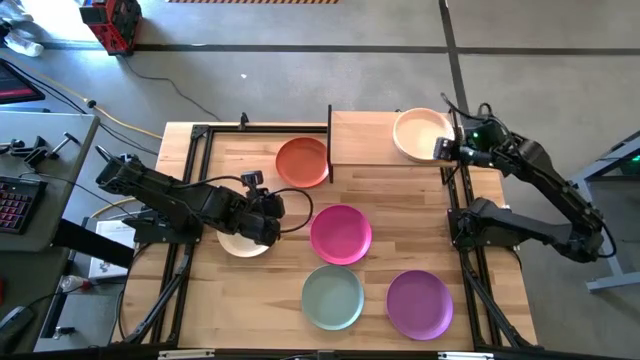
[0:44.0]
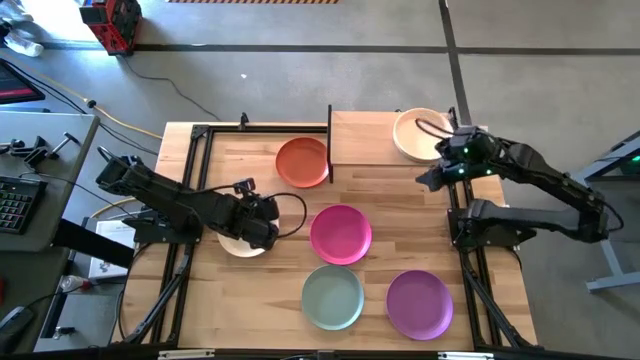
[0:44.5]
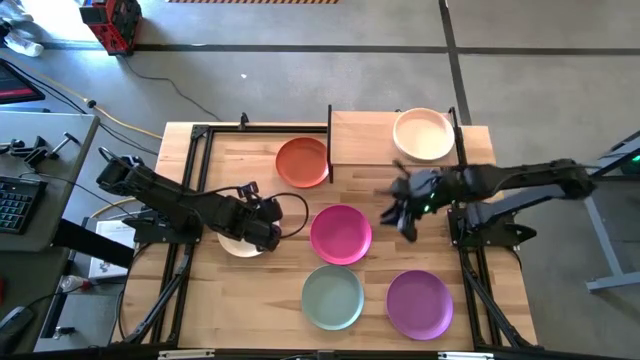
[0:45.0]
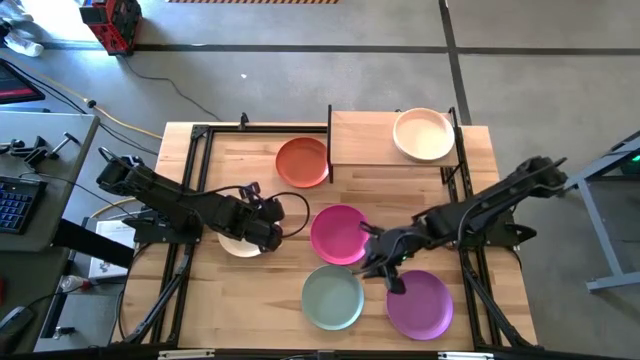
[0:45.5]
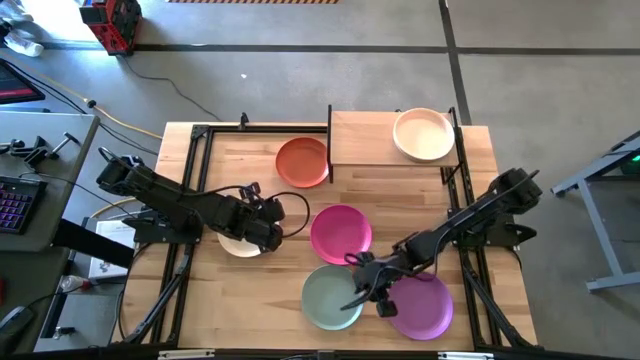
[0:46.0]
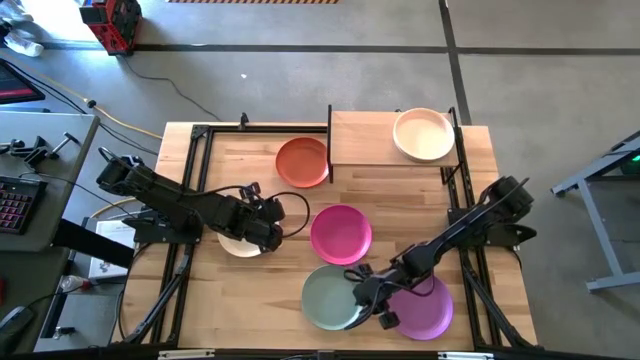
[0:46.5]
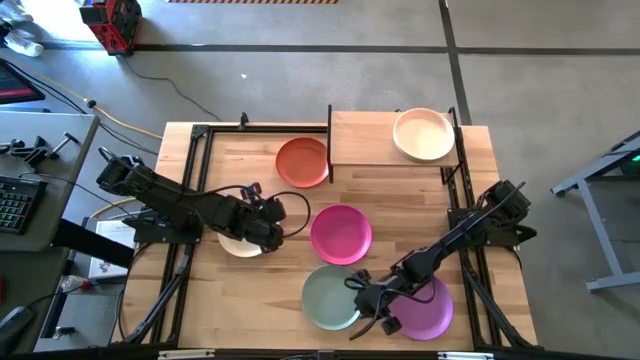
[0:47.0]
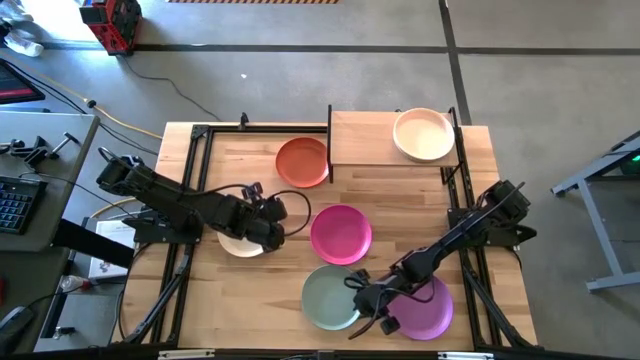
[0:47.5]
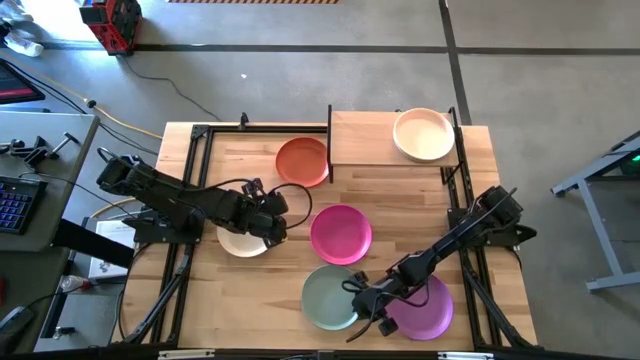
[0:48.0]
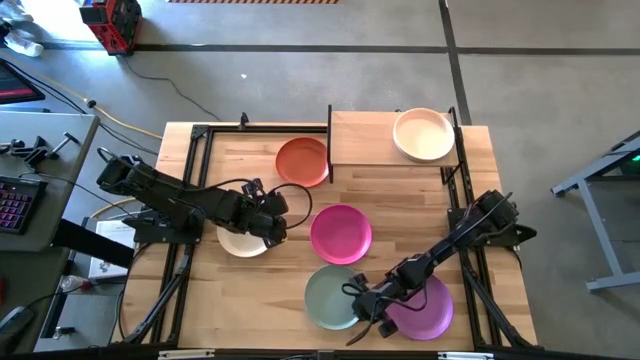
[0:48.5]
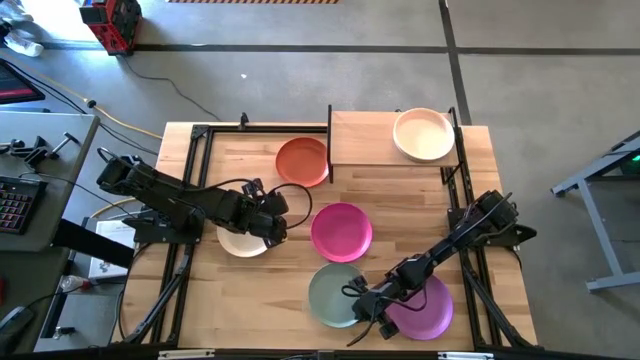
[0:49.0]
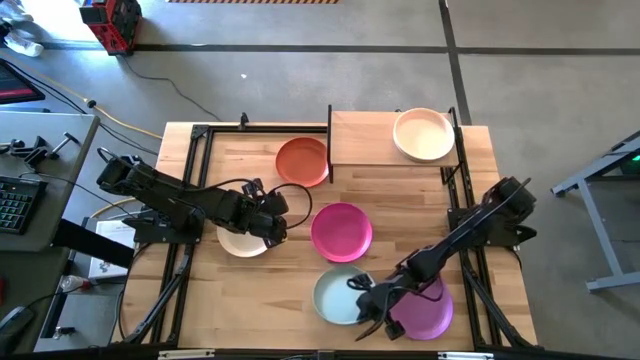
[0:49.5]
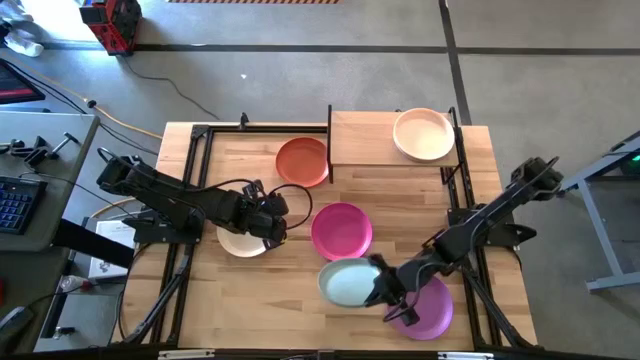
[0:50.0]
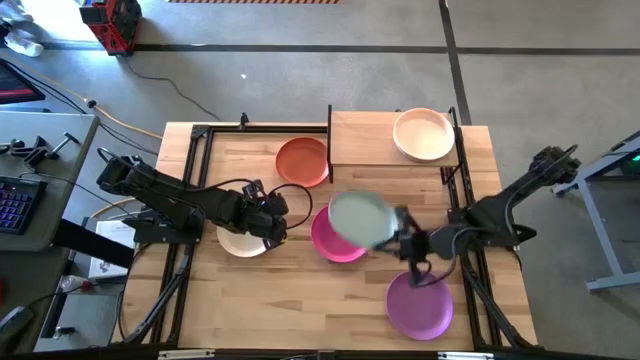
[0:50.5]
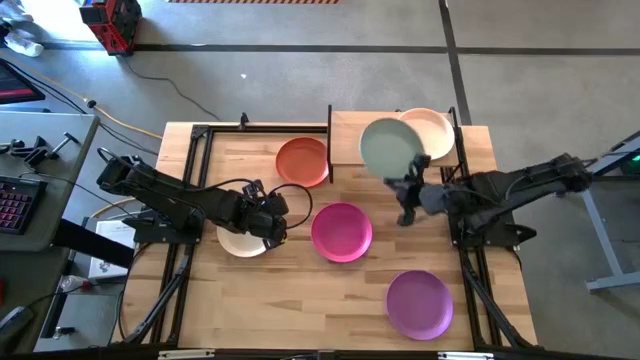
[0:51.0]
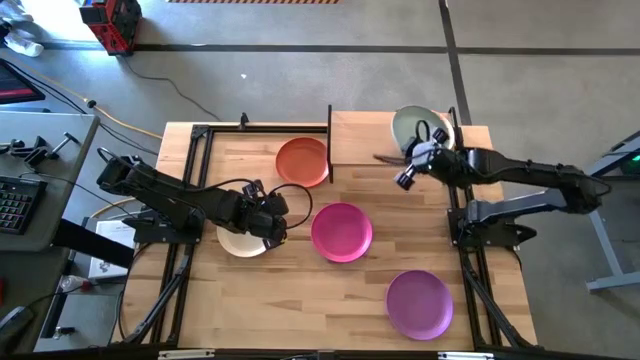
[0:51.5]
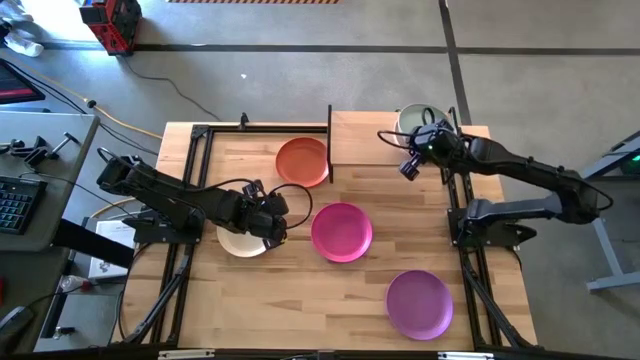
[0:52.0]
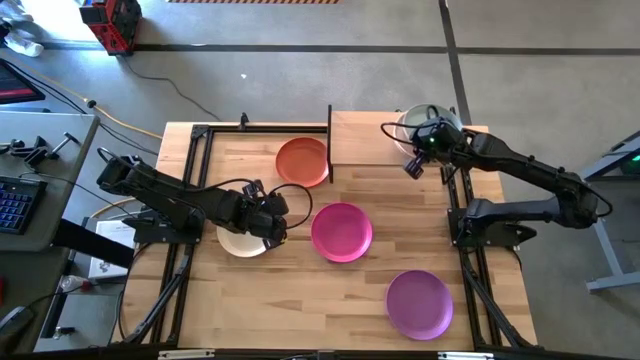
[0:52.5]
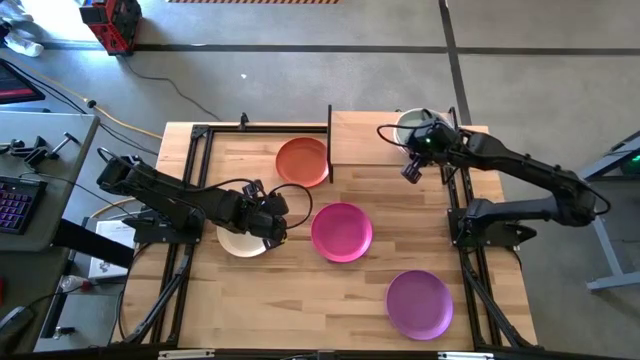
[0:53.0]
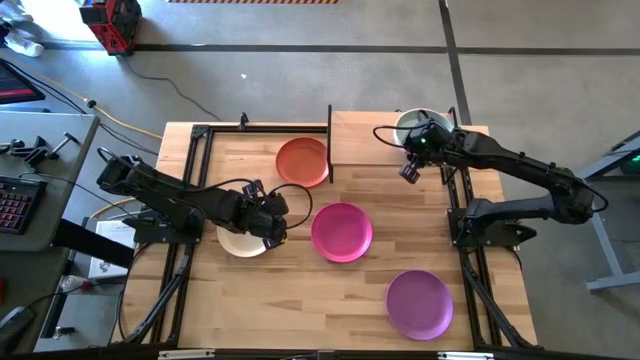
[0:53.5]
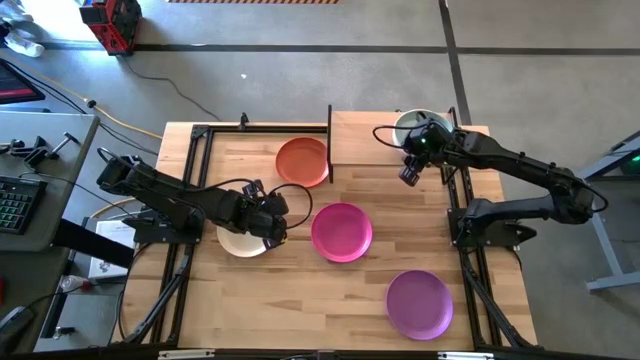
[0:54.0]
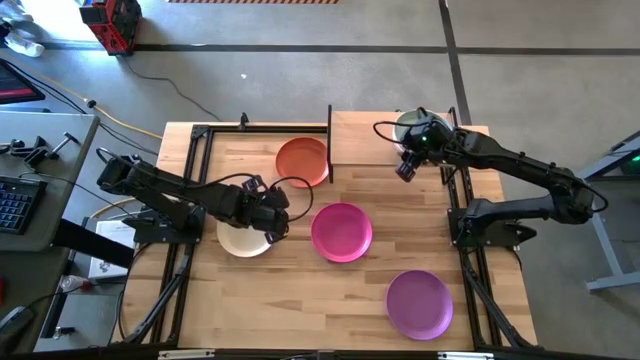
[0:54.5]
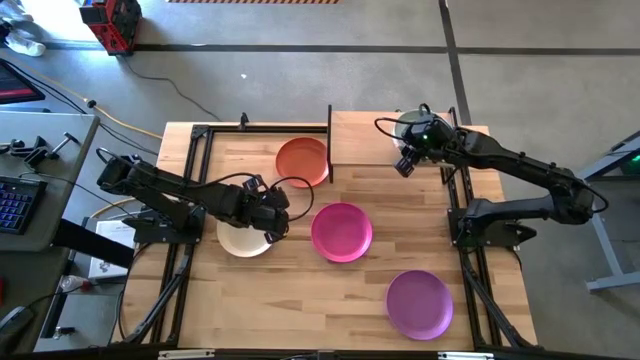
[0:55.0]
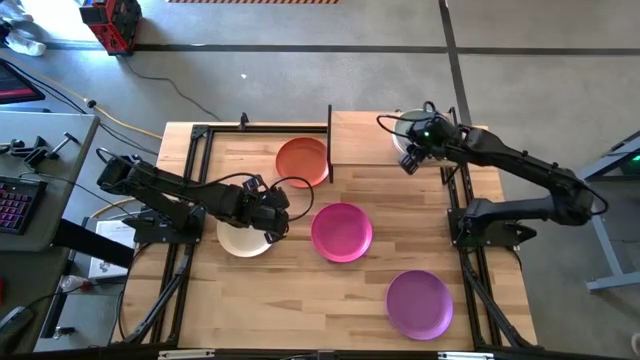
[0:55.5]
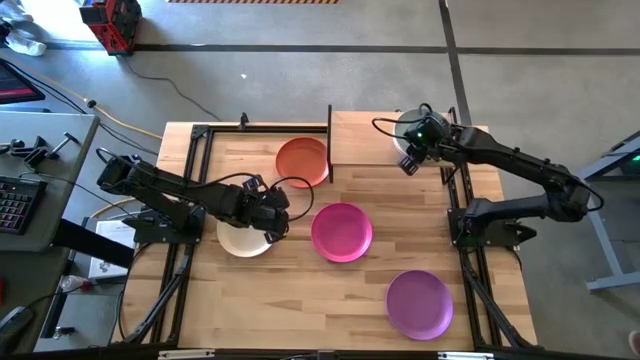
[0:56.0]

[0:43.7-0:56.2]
Task: Place and stack plates onto a shelf
Stack the light blue plate on top of the peach plate on the shelf

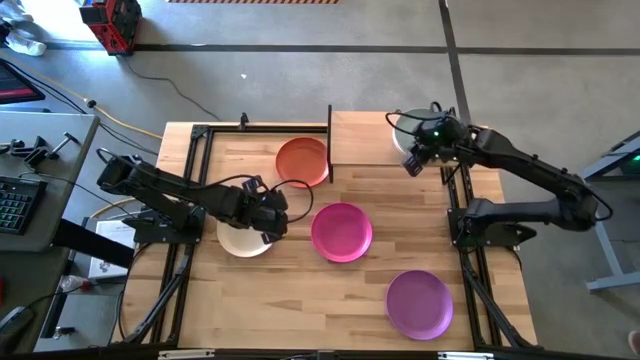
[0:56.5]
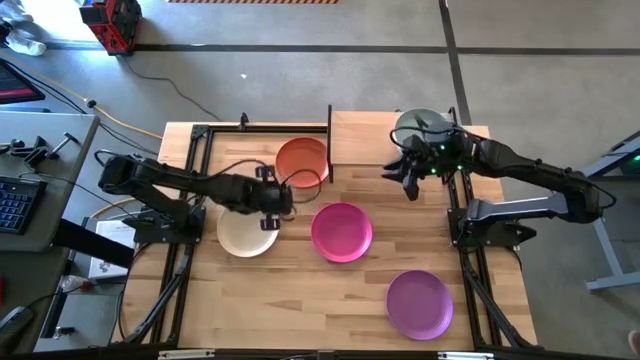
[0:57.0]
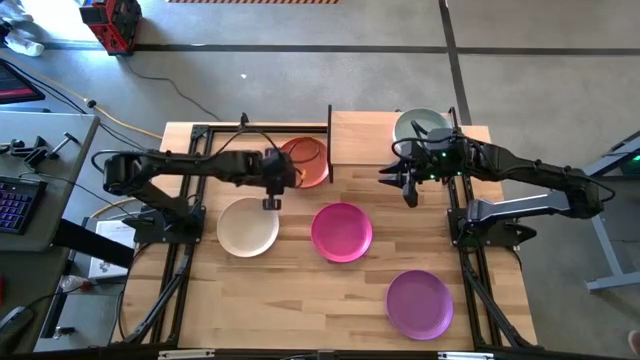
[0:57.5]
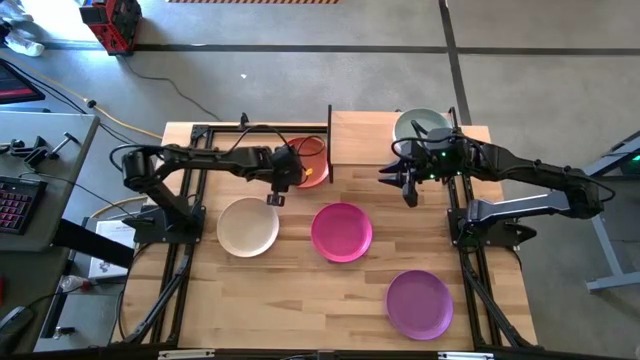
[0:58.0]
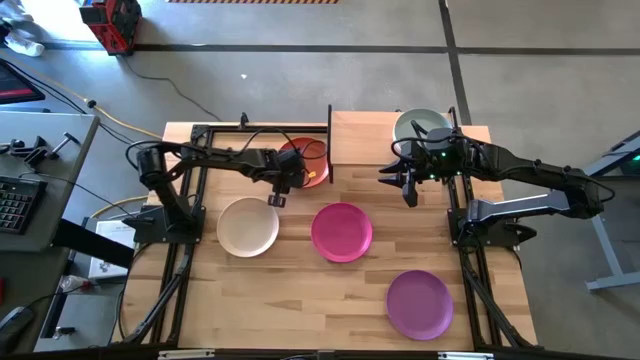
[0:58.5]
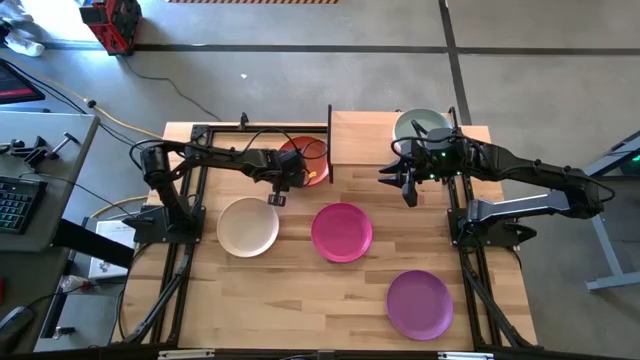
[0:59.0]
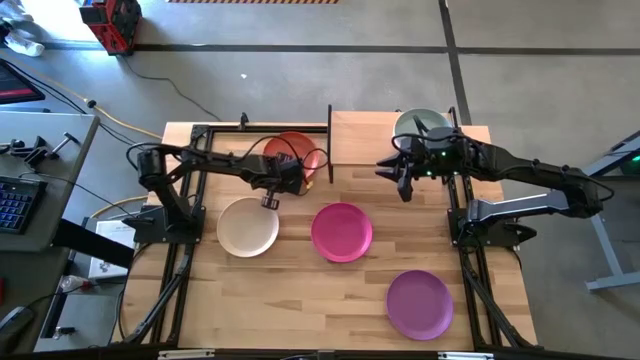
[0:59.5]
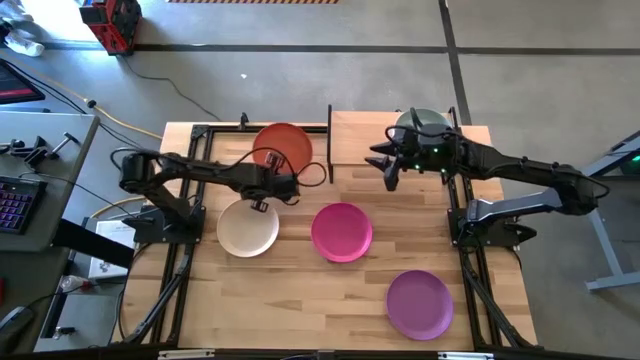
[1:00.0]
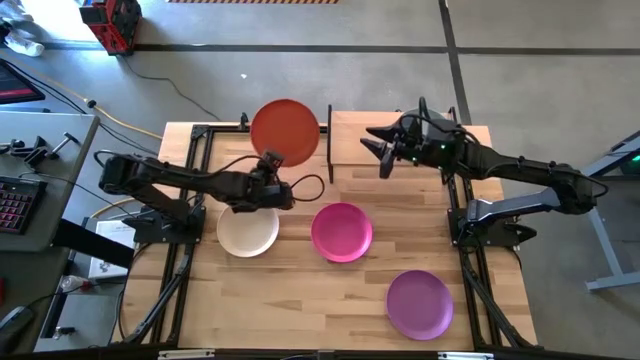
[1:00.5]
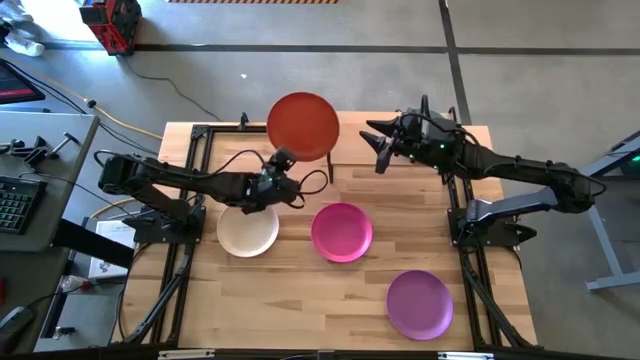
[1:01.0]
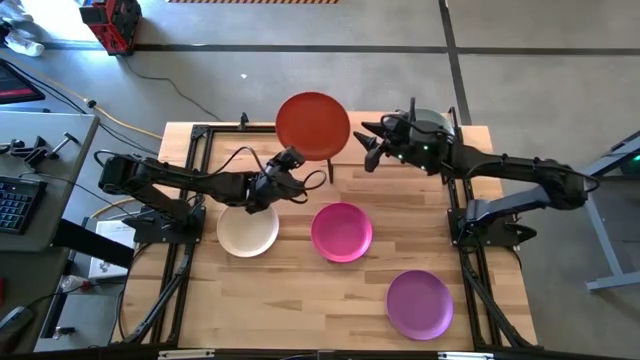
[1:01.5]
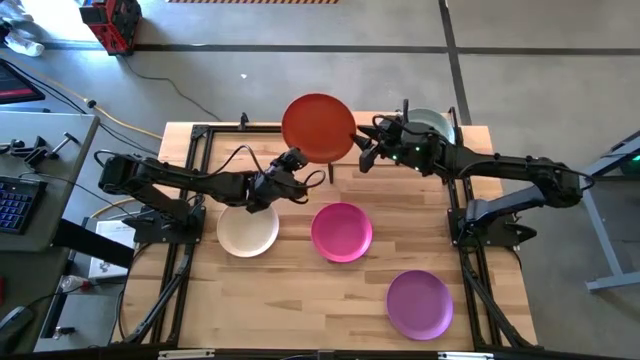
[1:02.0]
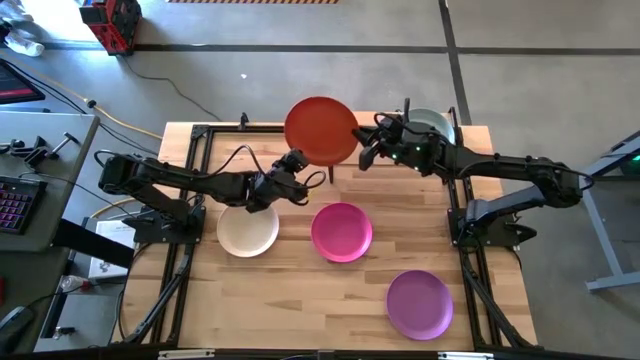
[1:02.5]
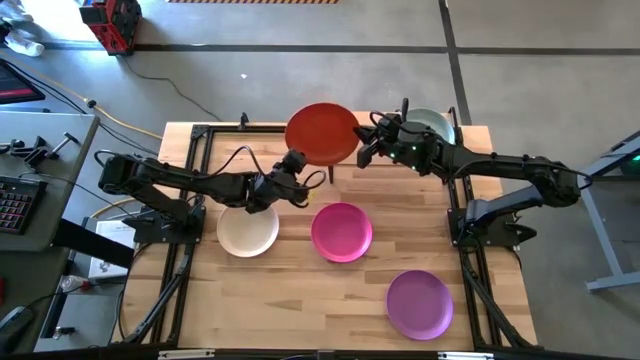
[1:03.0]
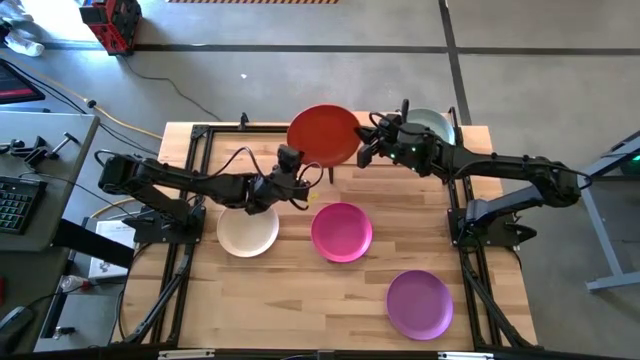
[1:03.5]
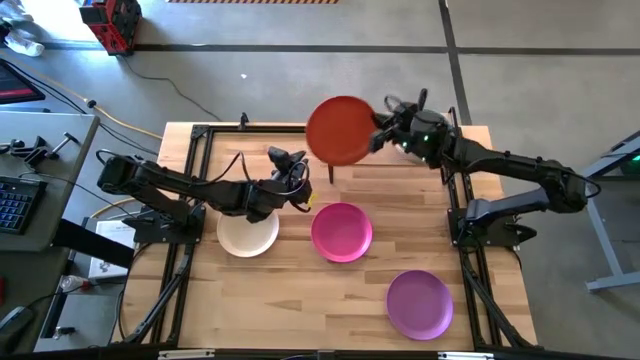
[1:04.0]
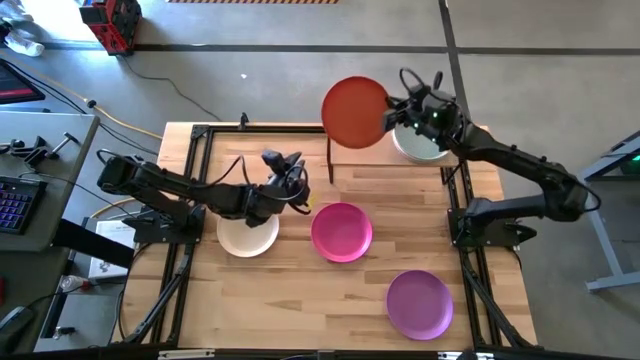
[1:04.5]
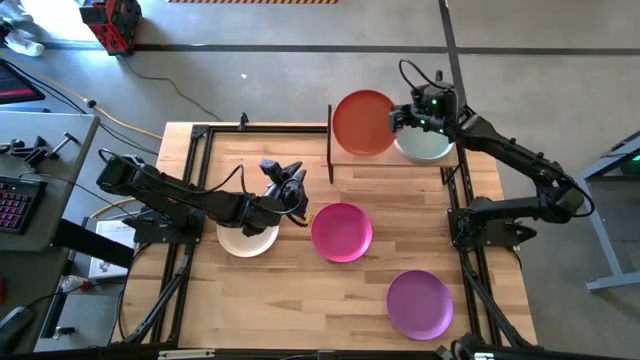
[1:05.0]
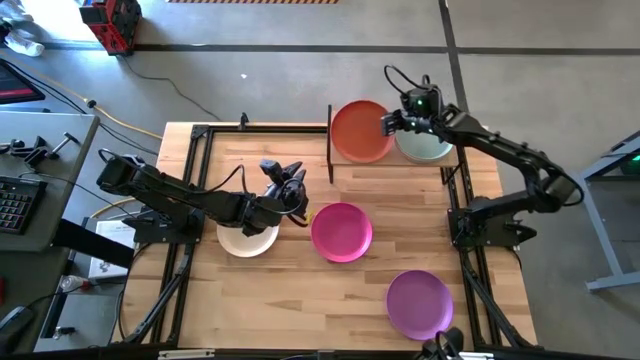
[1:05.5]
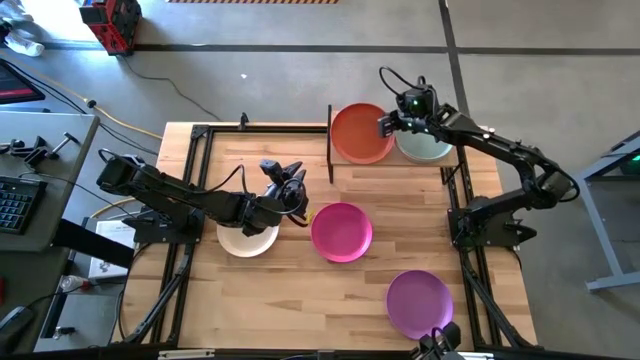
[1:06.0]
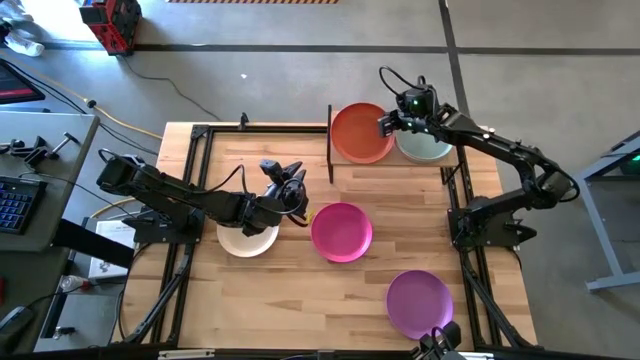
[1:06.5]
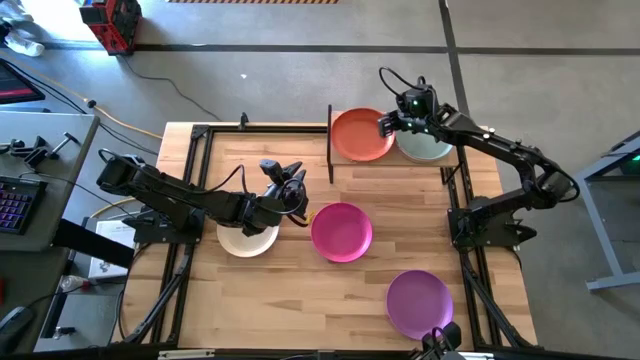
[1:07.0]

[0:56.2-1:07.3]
Put the orange plate on the shelf
